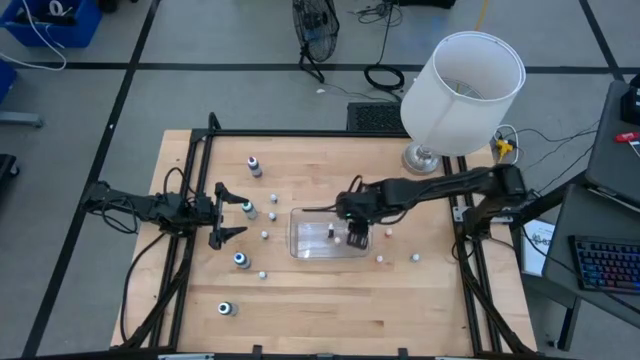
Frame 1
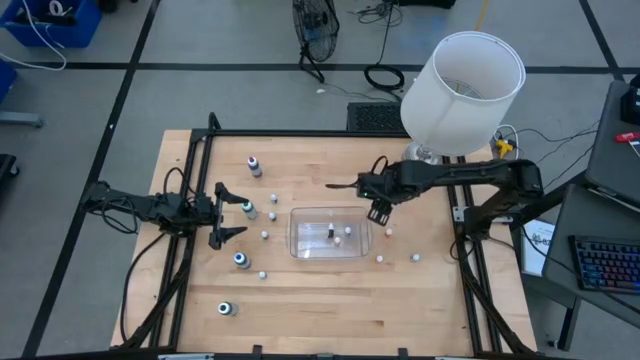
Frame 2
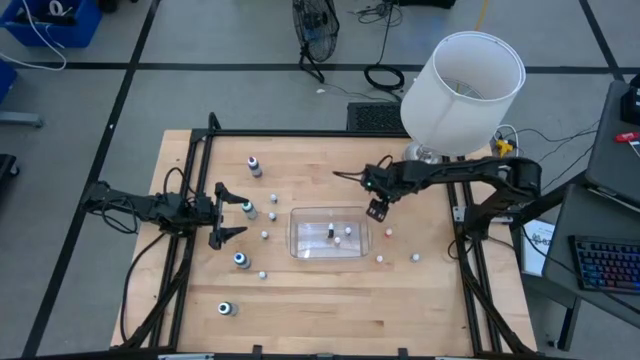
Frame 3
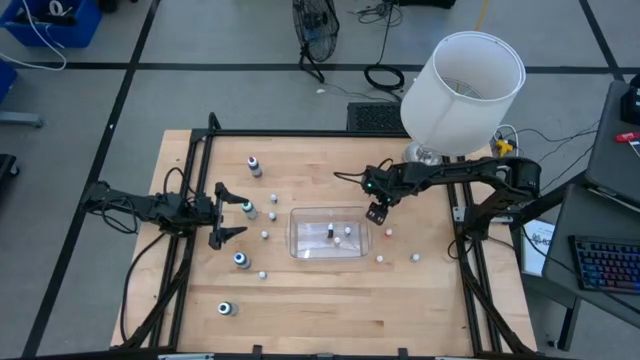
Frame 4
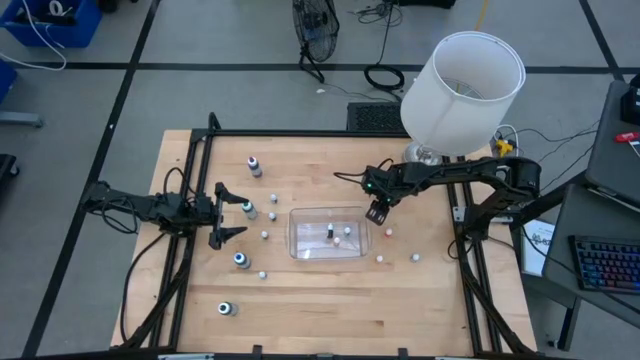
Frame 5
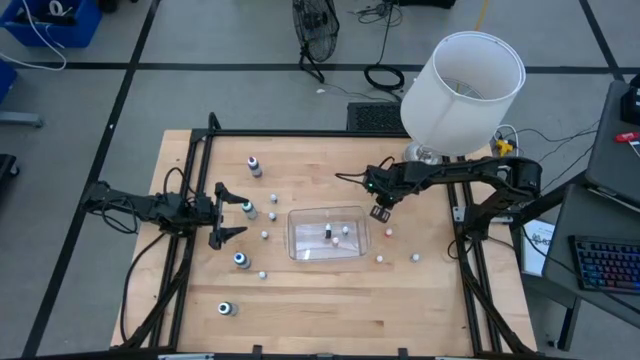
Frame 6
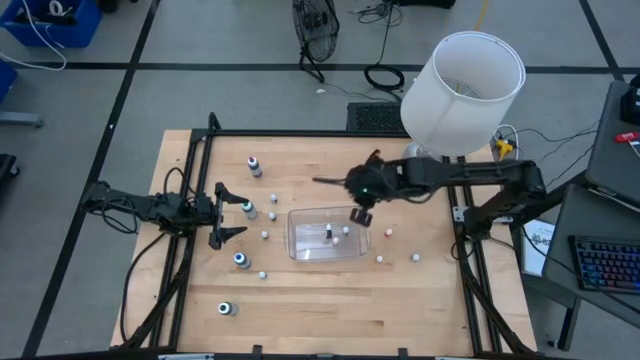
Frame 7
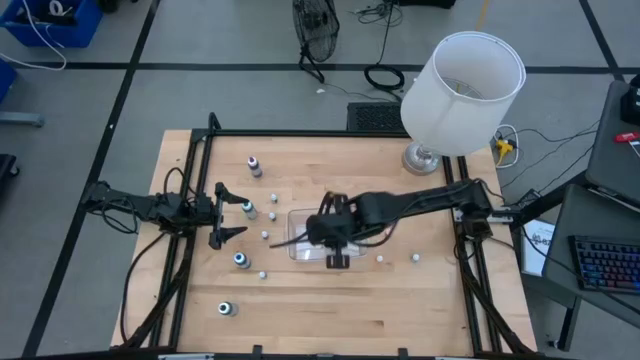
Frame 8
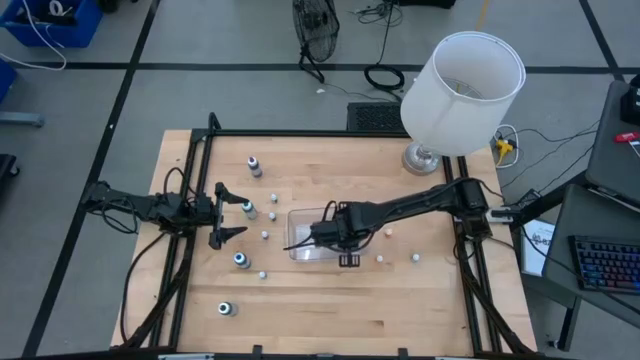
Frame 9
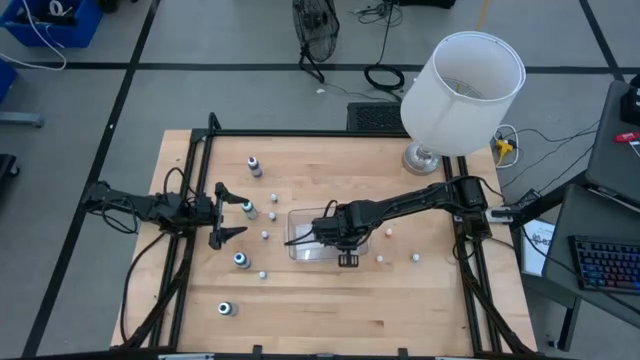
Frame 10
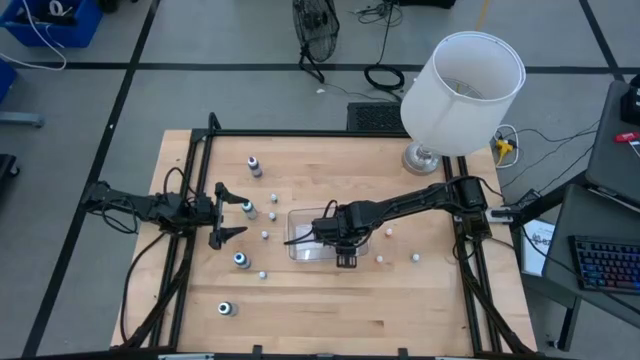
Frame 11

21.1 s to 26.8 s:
Task: Pick & Place food coloring
Put the small orange food coloring bottle into the transparent bin

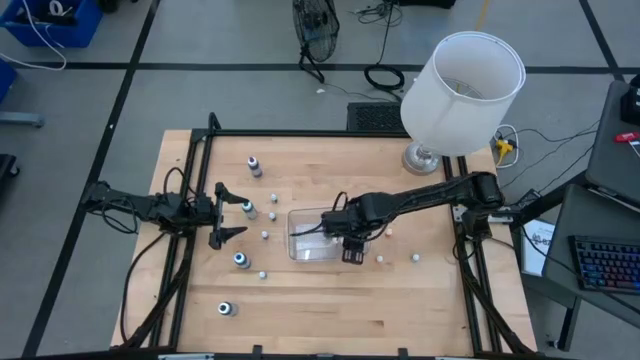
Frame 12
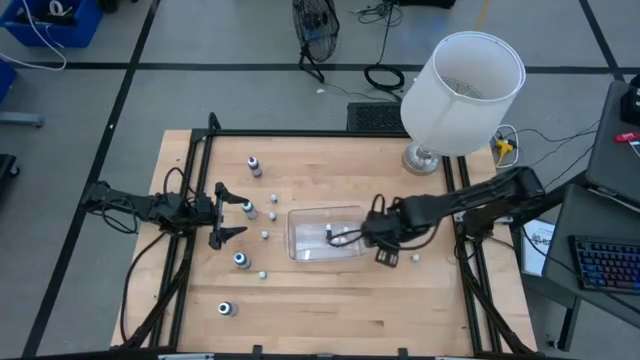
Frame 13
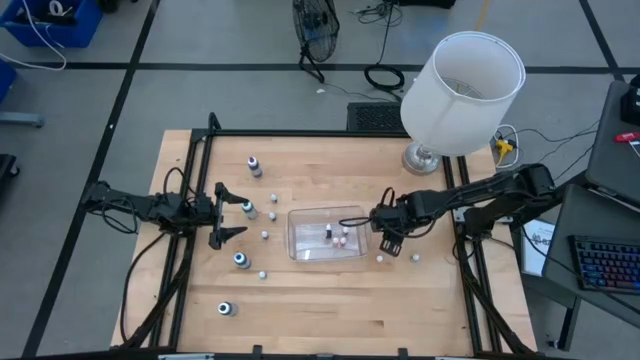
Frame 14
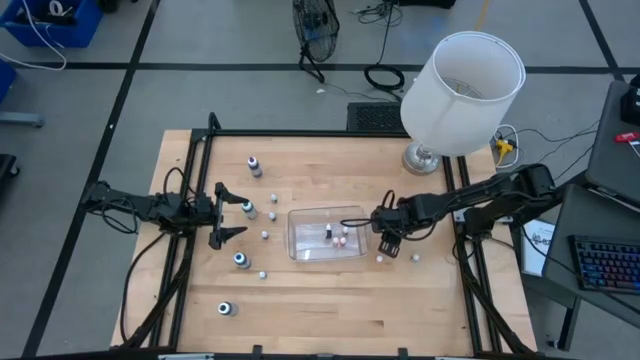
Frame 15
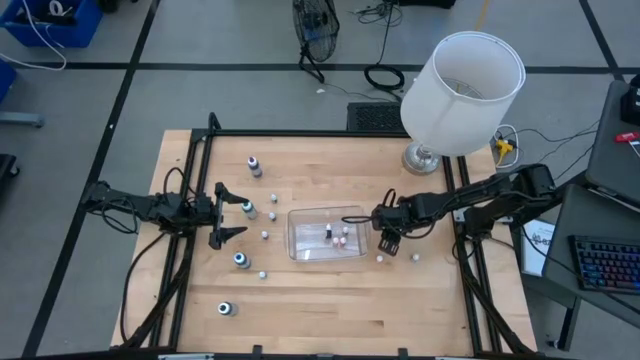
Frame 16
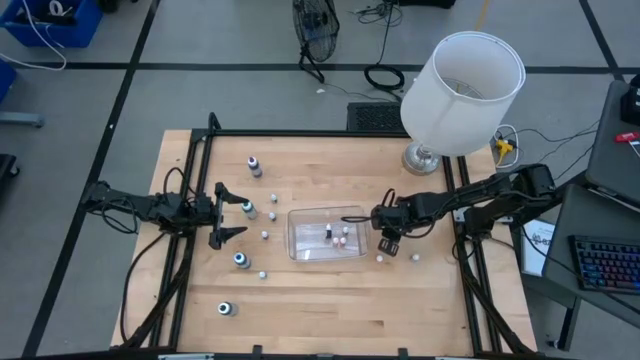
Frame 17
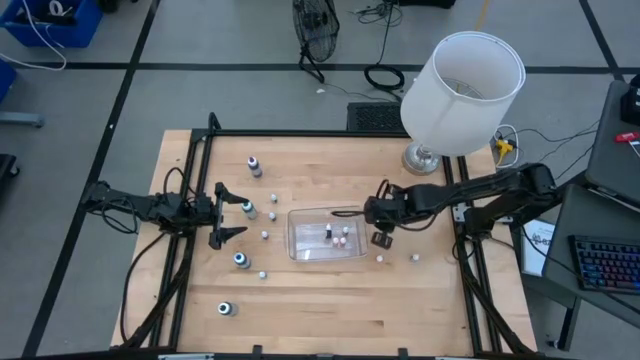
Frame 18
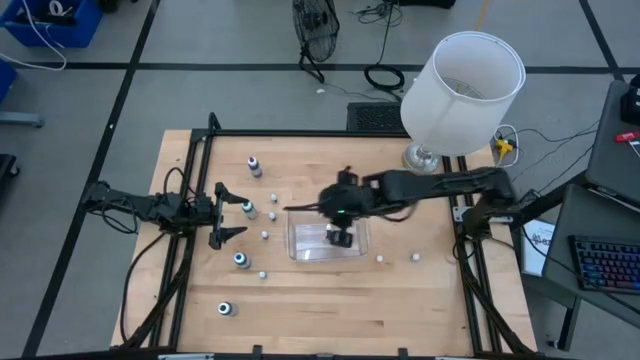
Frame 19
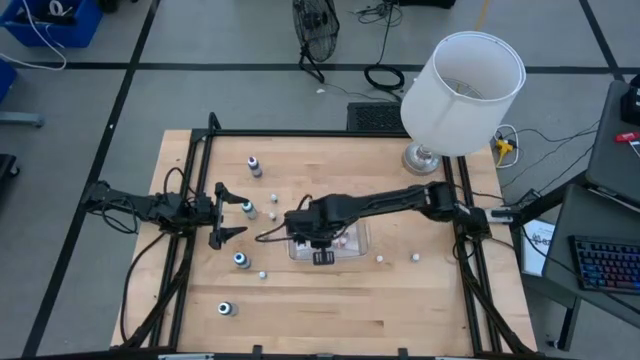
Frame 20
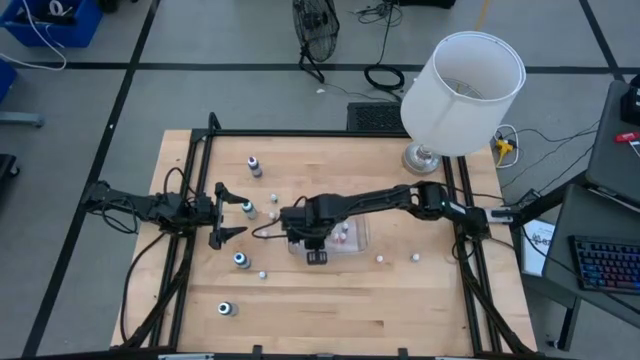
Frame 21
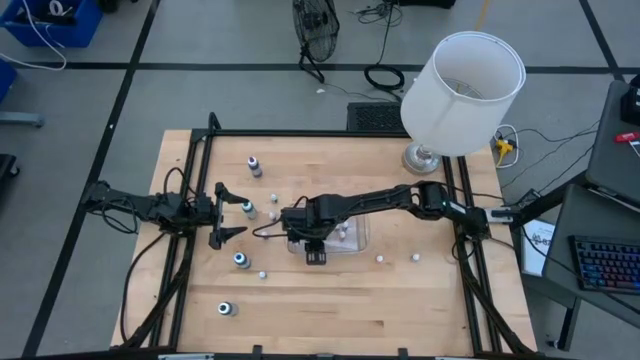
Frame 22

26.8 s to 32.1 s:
Put the small orange food coloring bottle into the transparent bin

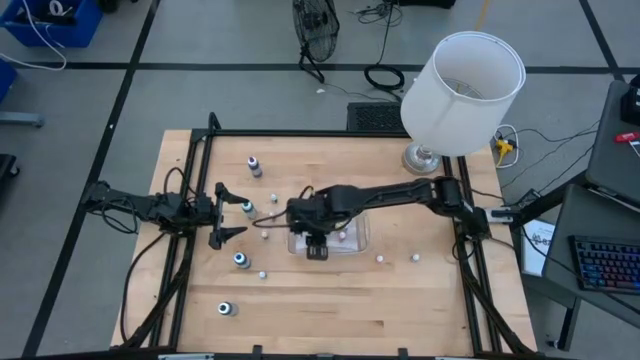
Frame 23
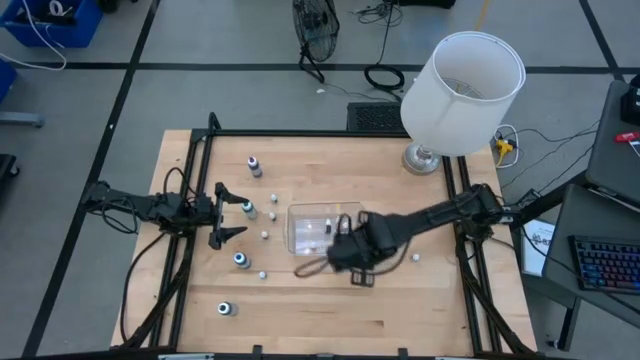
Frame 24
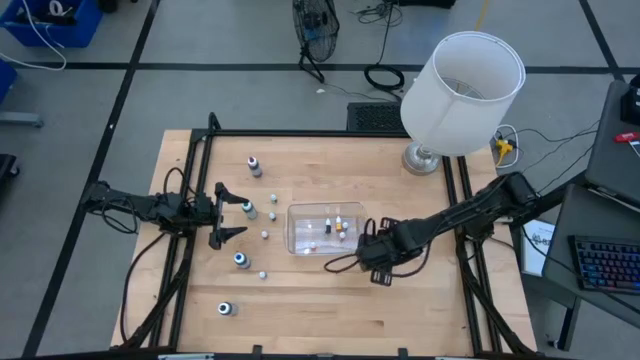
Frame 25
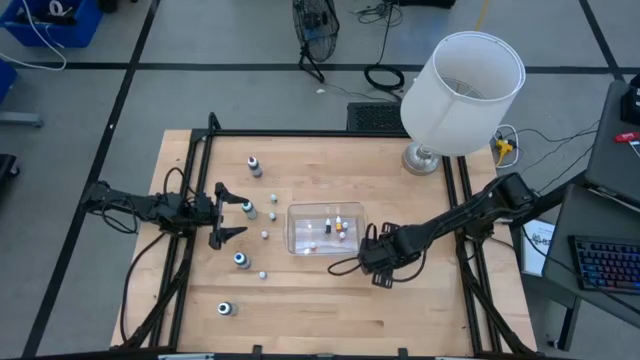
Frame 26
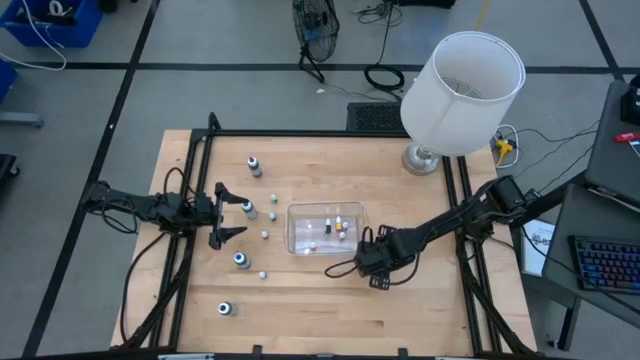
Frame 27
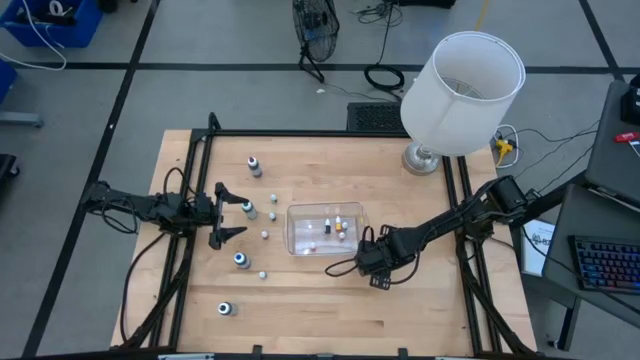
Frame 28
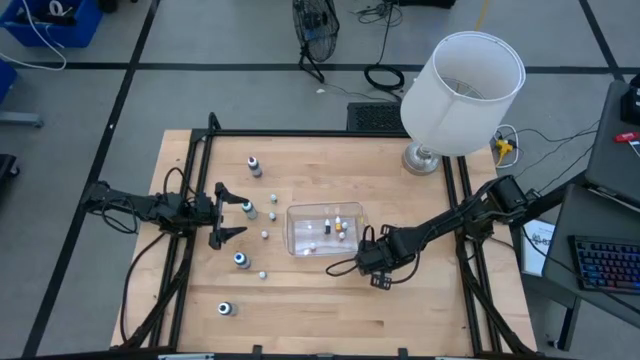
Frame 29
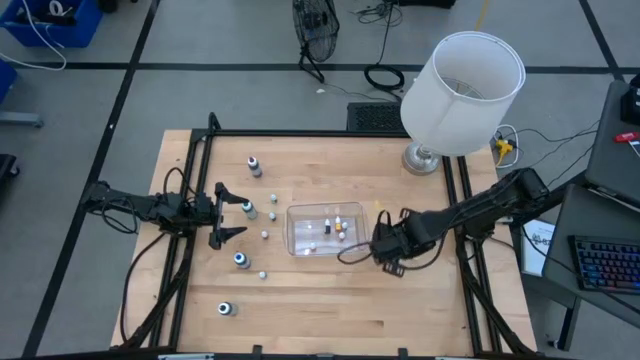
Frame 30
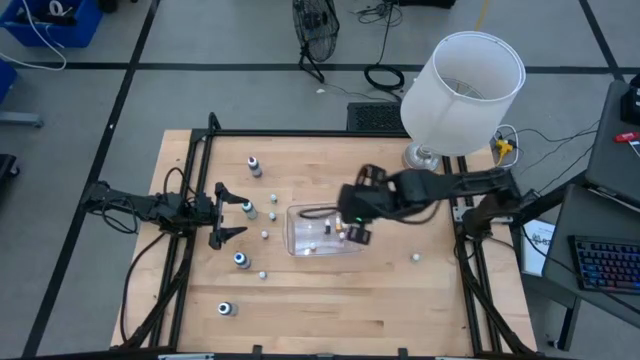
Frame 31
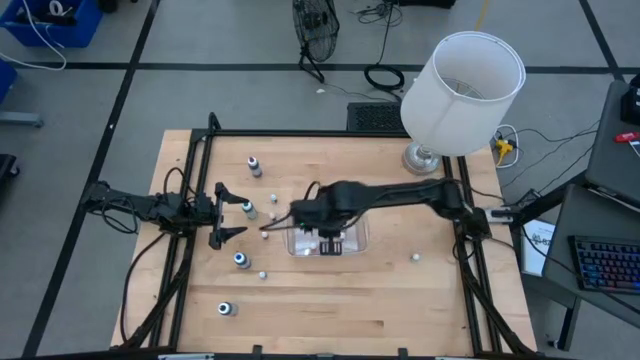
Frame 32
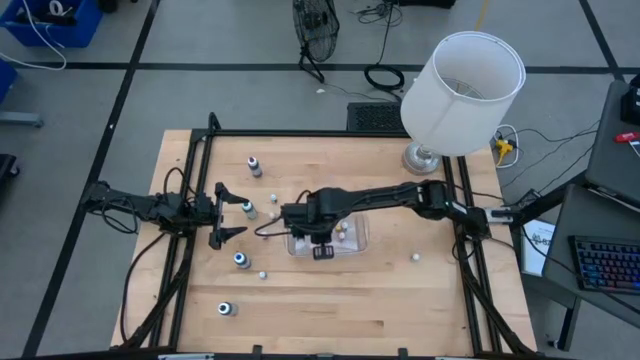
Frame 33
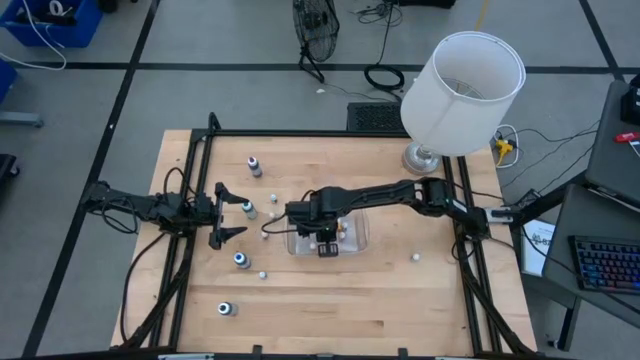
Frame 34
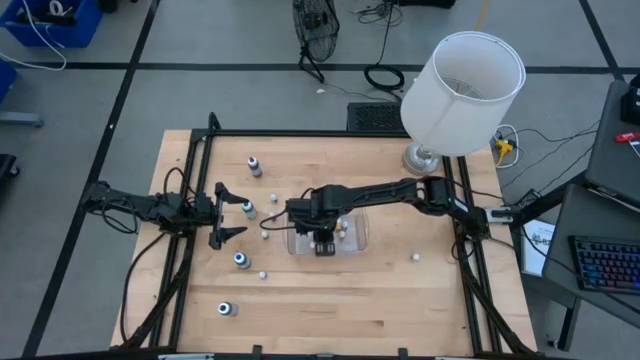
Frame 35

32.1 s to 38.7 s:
Put the small orange food coloring bottle into the transparent bin

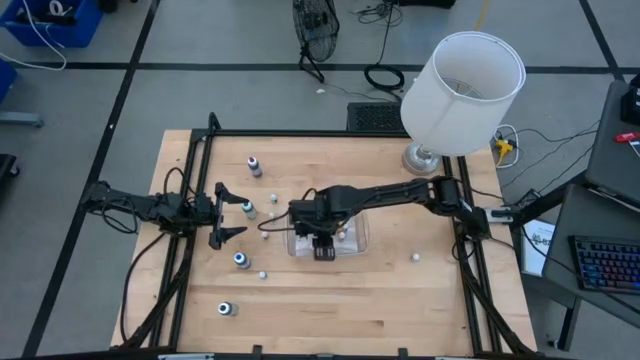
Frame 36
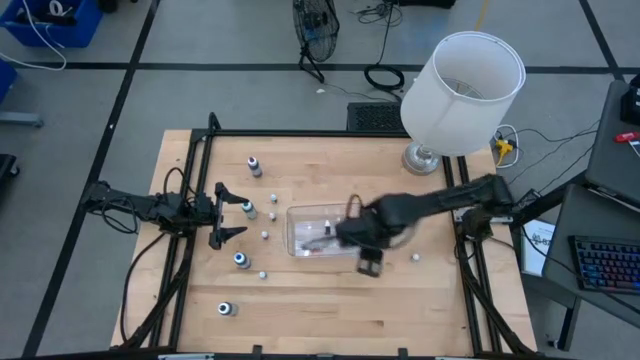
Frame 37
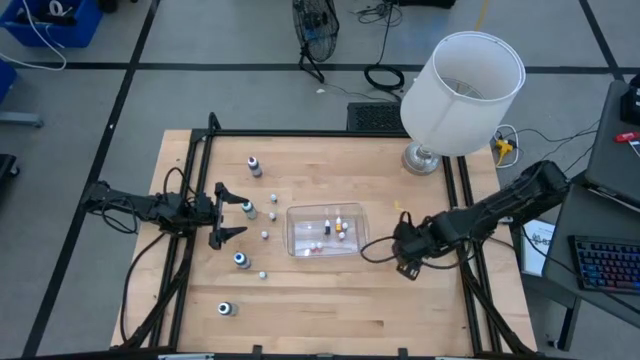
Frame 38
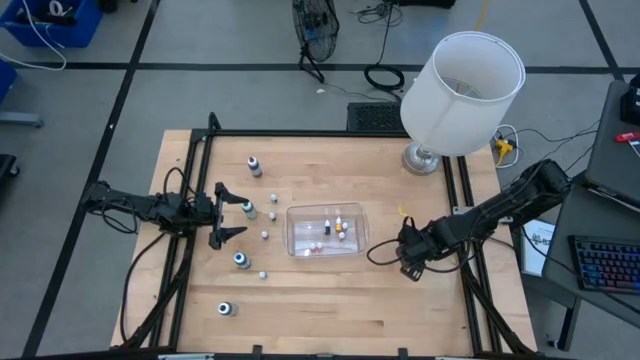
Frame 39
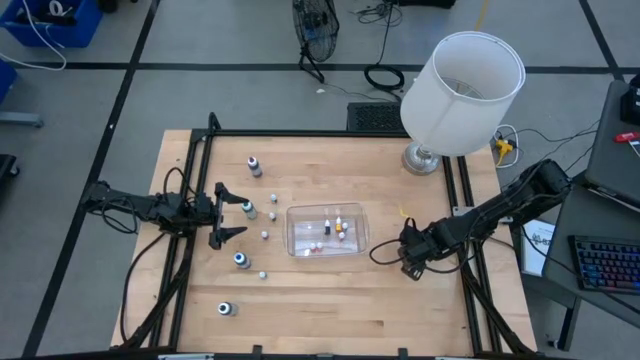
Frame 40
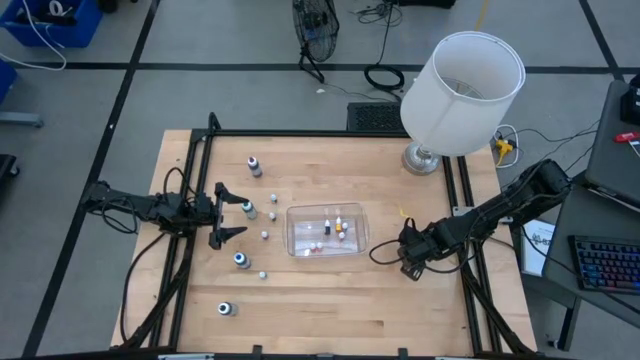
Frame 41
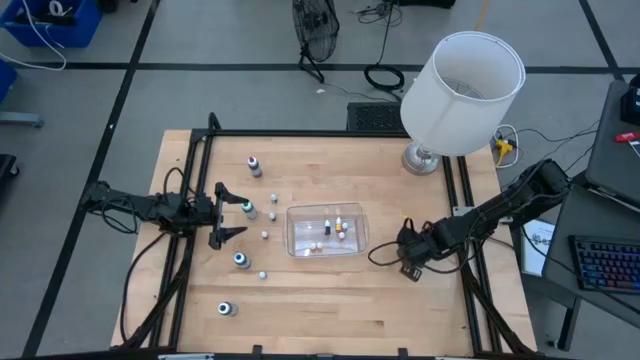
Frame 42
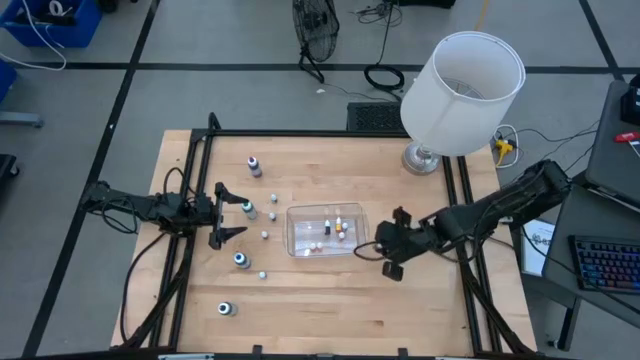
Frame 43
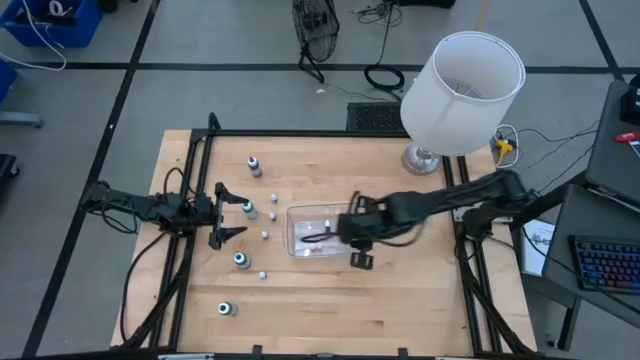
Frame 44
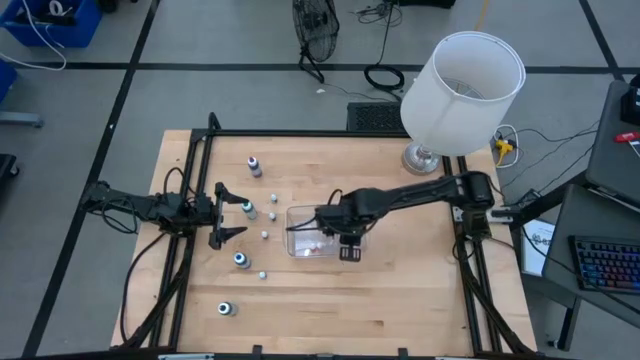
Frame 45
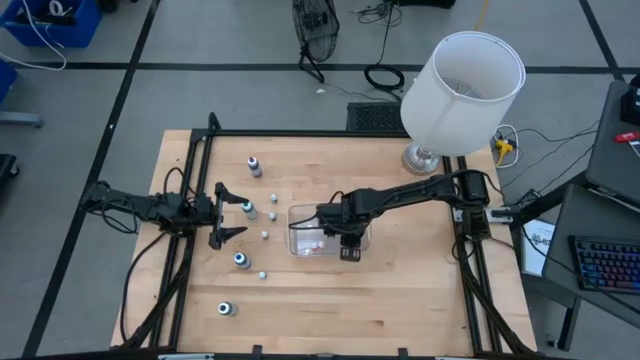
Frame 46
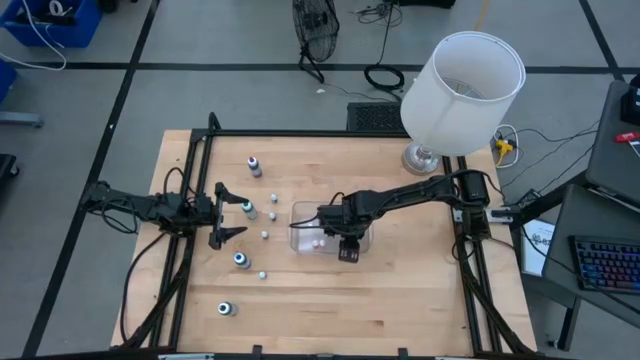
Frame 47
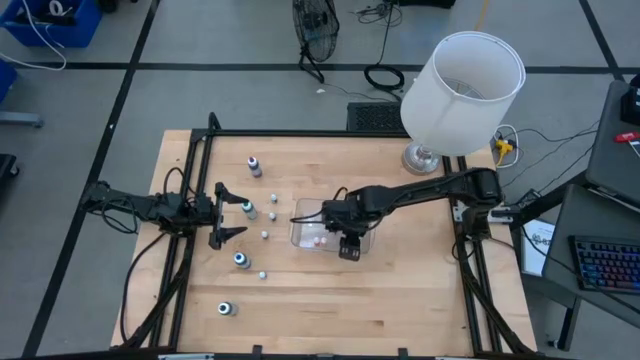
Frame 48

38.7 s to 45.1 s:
Put the small purple food coloring bottle into the transparent bin
